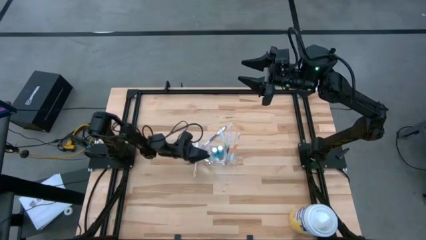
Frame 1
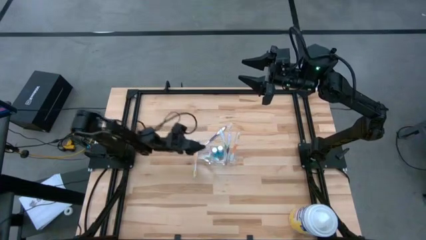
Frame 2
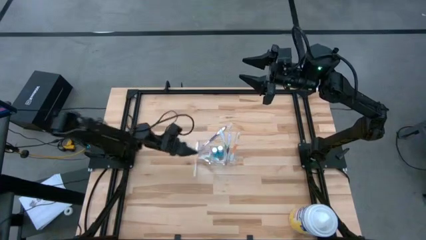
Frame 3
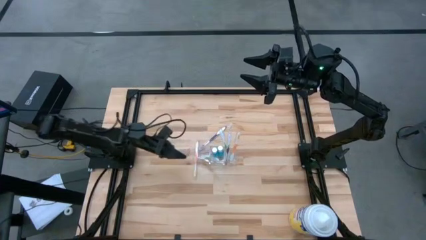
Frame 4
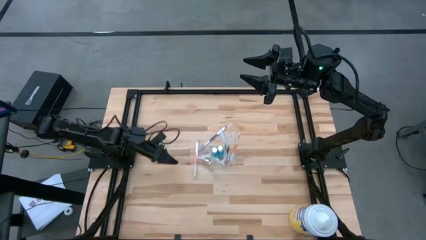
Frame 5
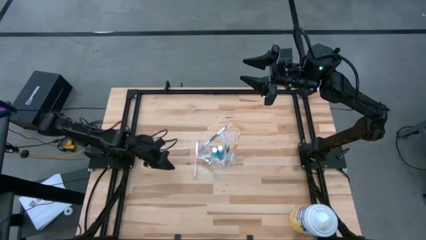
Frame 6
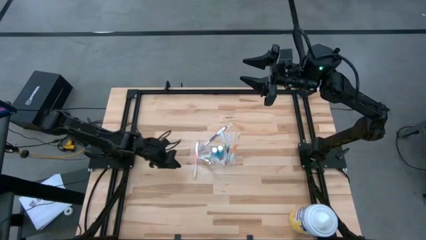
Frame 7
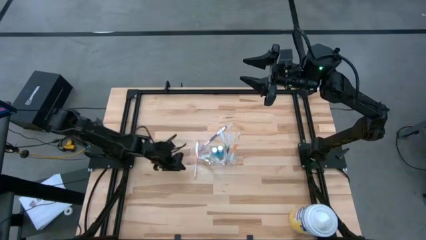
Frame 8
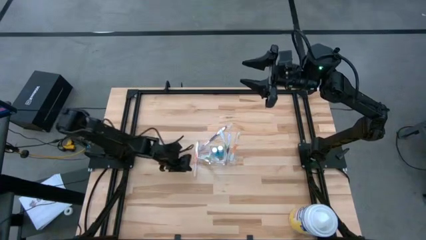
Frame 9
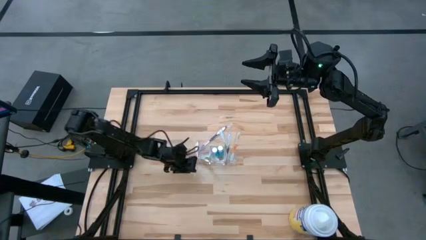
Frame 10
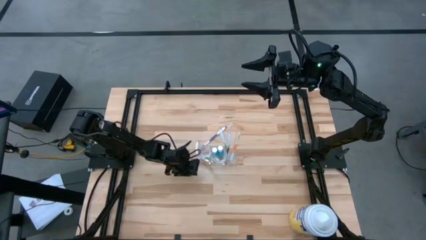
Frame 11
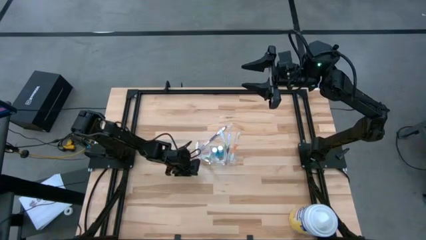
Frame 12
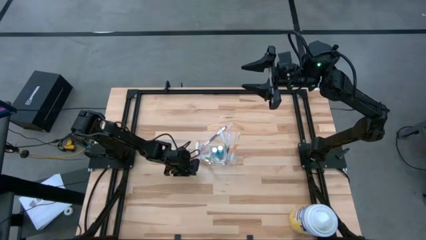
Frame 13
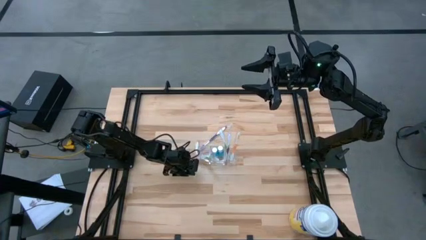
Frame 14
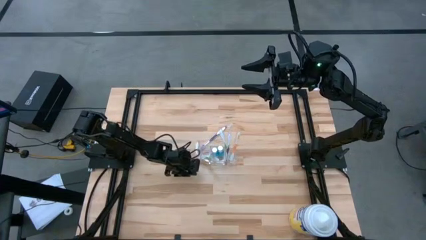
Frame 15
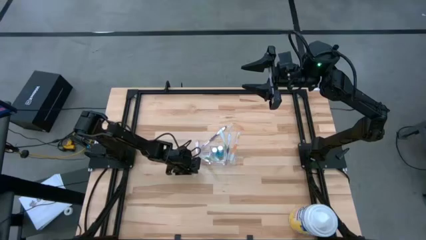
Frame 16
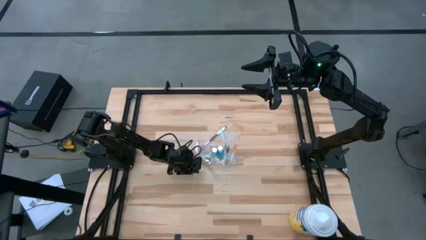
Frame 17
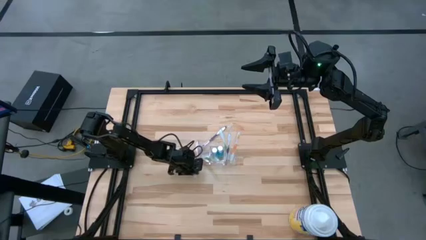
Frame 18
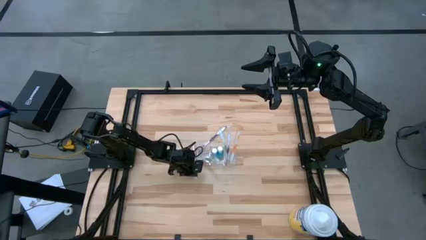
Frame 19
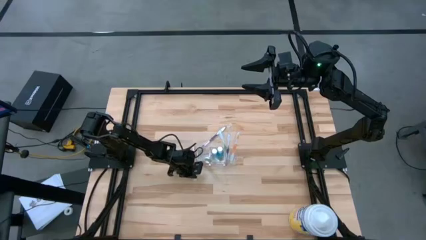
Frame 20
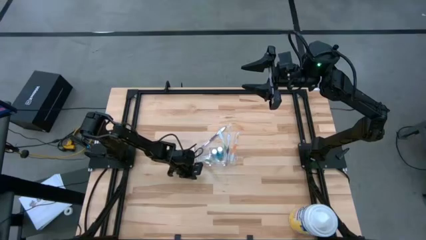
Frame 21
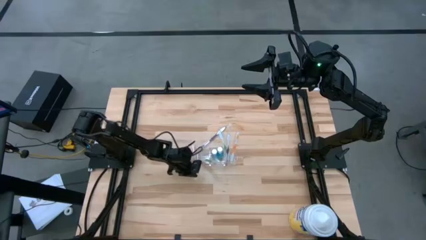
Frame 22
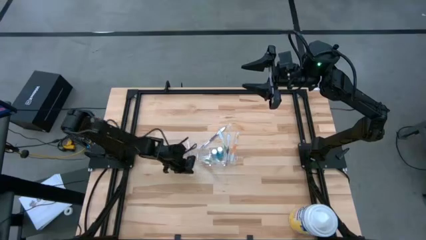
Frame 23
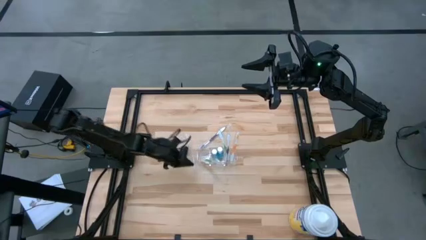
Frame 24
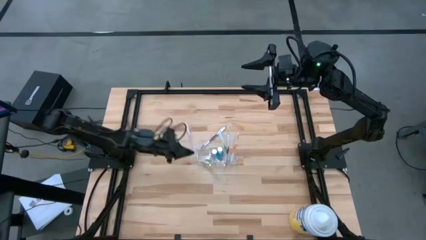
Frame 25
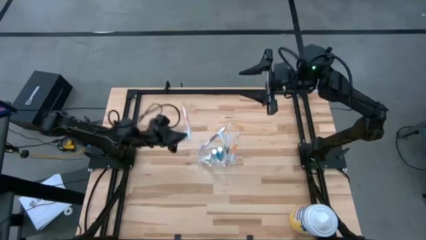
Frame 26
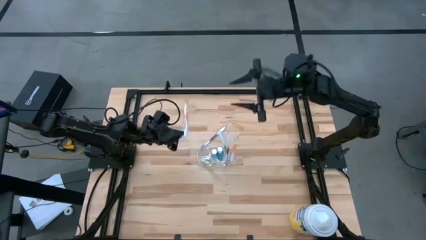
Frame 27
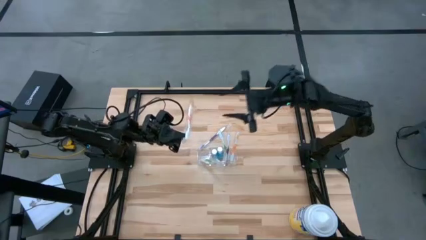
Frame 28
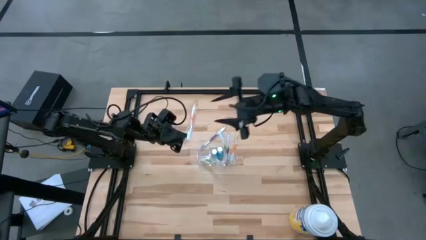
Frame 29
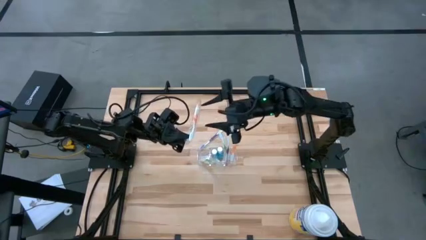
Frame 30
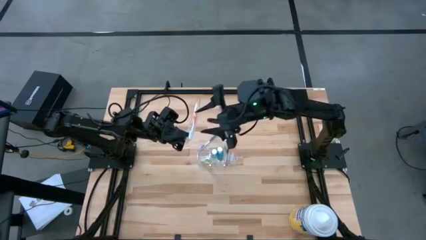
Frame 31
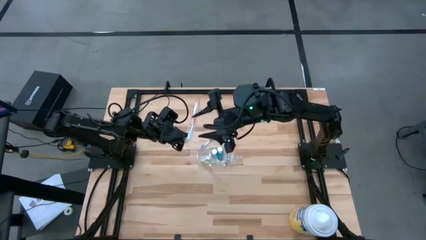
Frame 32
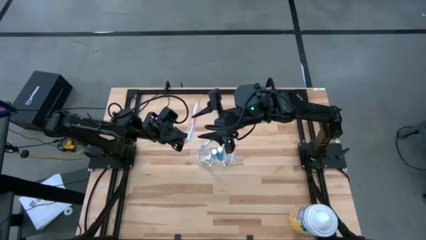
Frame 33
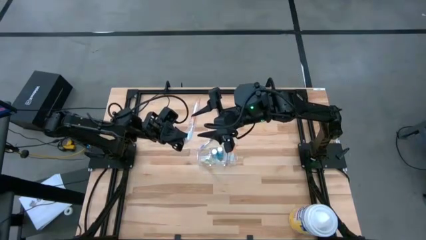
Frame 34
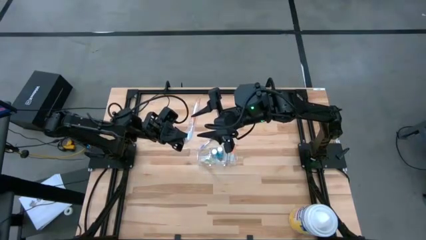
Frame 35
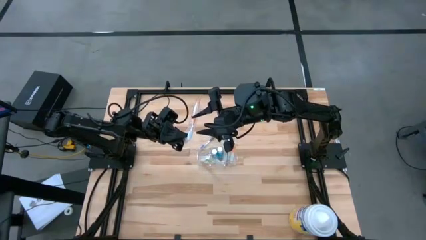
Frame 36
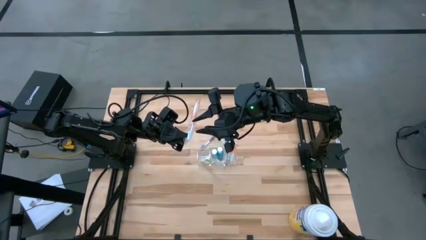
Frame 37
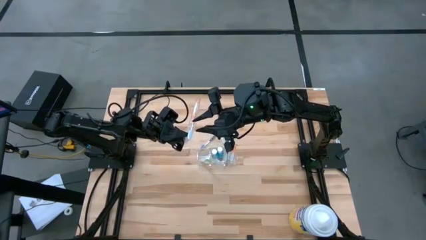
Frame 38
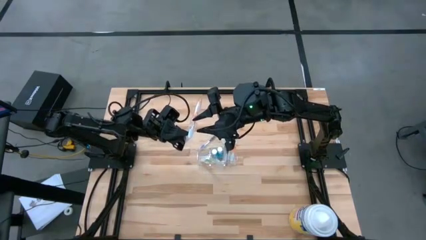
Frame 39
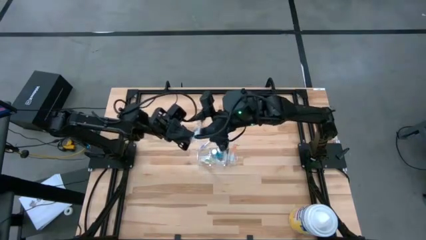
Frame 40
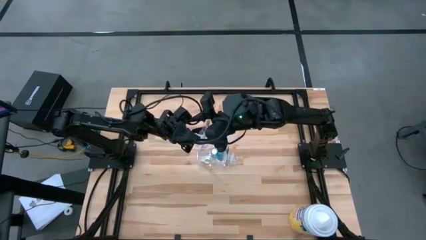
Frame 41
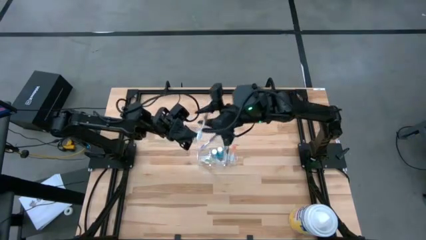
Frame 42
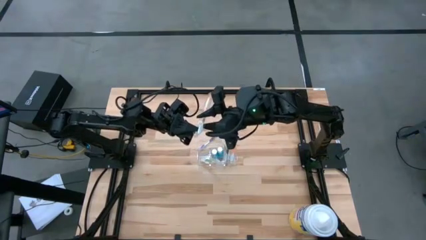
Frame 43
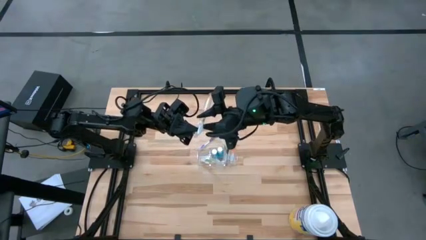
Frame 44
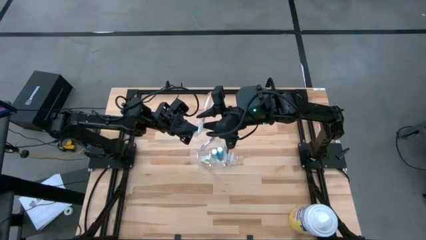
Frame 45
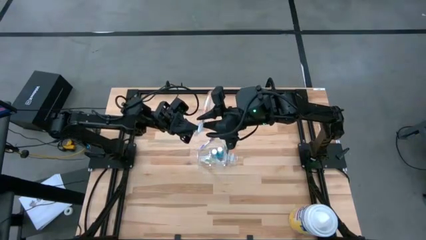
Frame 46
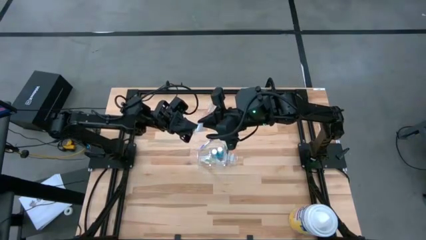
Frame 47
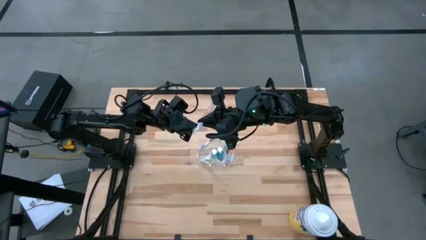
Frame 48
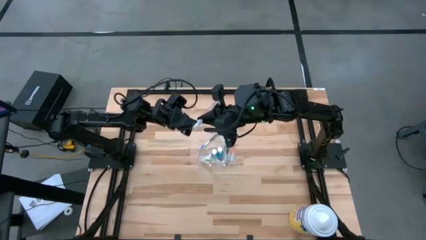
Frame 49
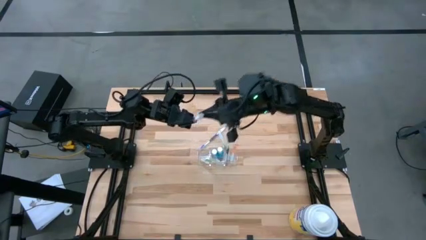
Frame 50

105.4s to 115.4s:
Task: Pick & Place toothbrushing station
Put the orange toothbrush into the transparent organizer

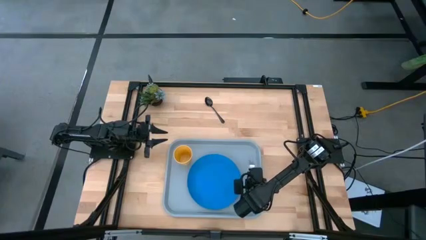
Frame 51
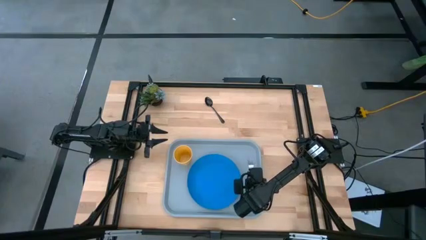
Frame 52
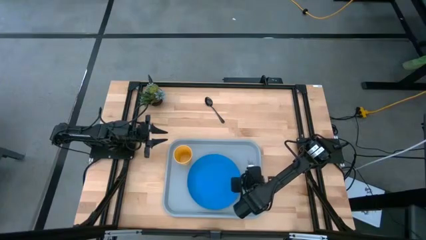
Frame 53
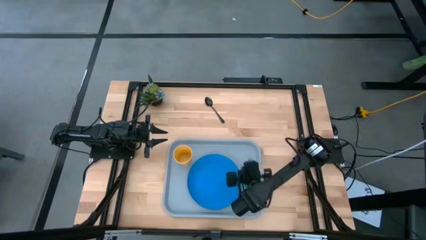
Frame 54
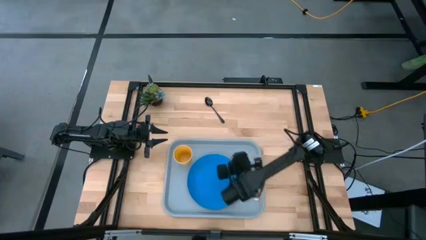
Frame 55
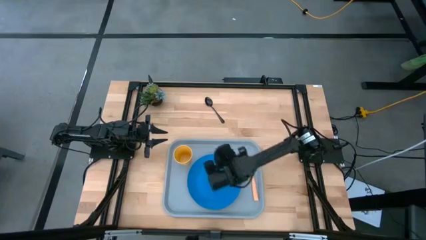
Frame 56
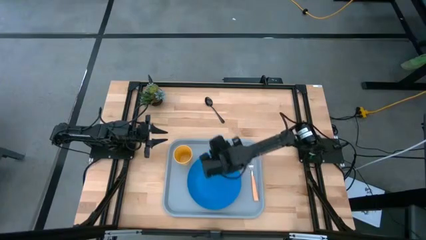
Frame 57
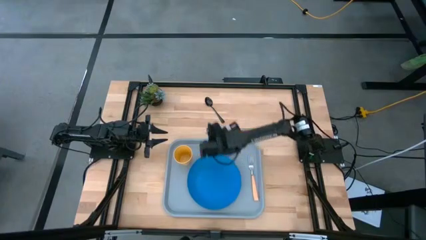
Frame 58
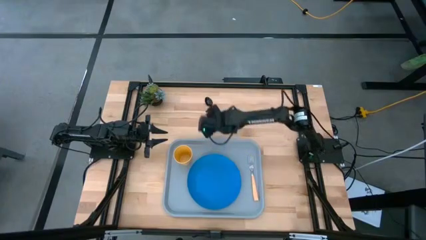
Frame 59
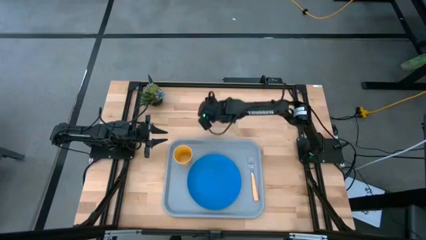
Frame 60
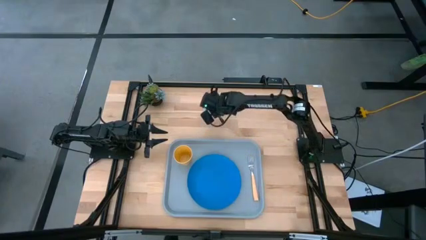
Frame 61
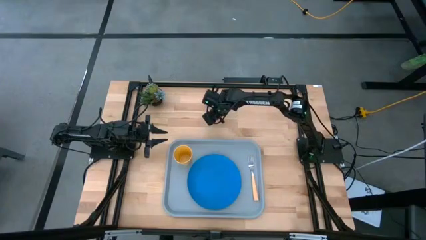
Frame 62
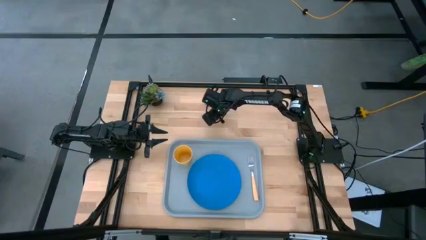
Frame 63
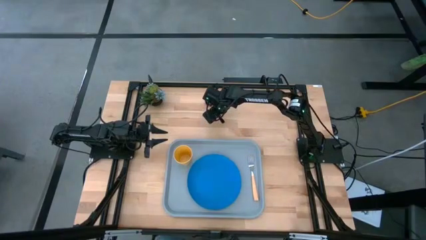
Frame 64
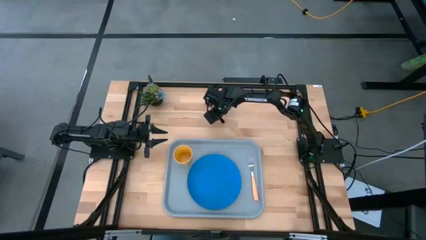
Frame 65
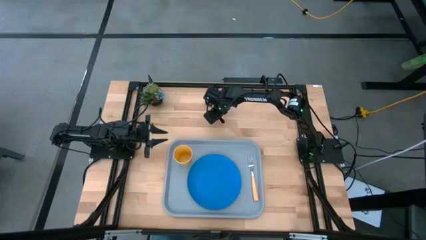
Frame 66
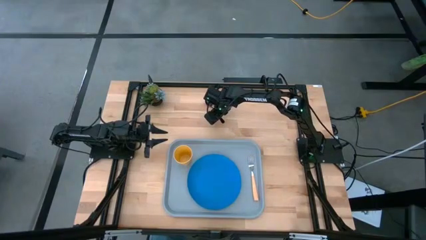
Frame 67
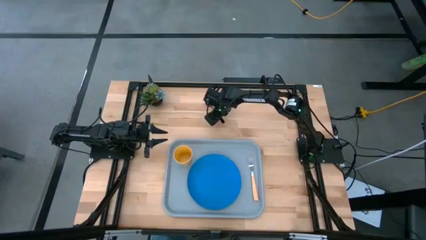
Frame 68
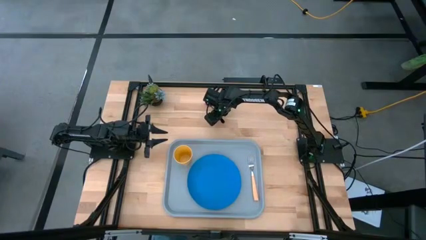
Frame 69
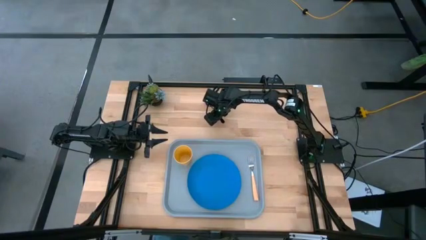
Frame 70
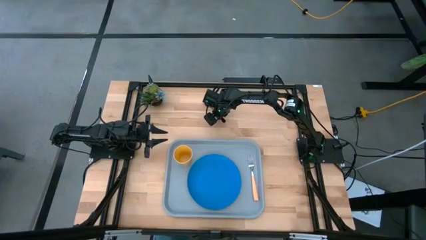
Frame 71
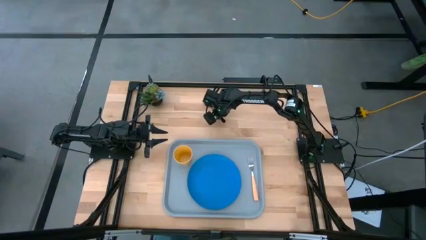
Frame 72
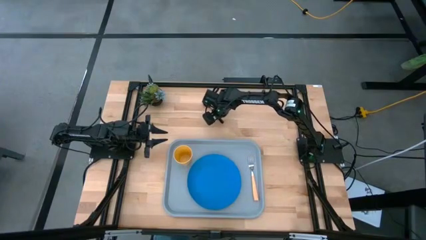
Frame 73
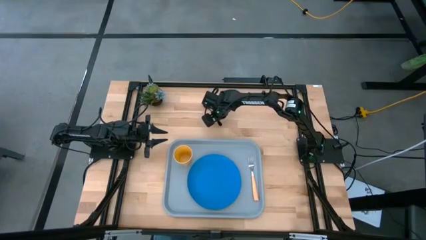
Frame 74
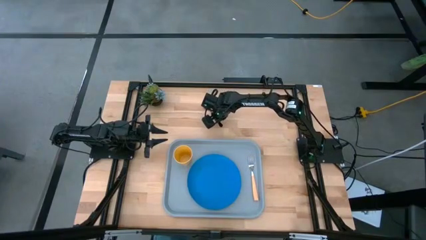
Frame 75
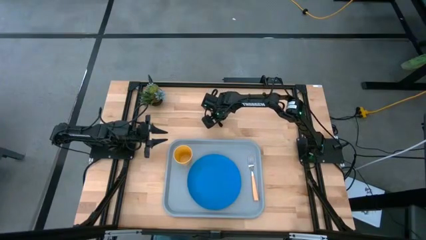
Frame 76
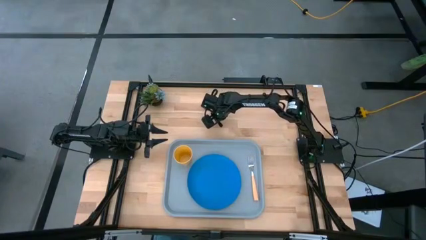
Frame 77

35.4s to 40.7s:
Task: Pick and place plate/cup/fork/spoon on tray
Put the black spoon on the gray tray to the right of the blue plate
